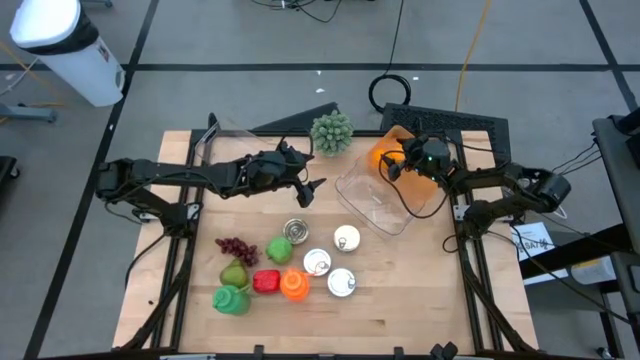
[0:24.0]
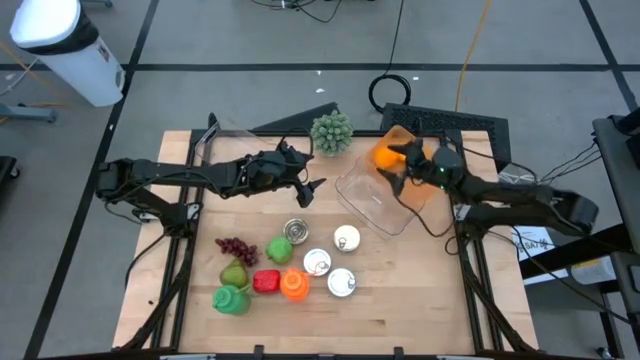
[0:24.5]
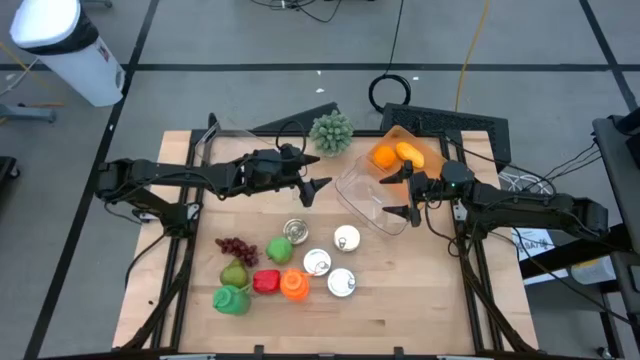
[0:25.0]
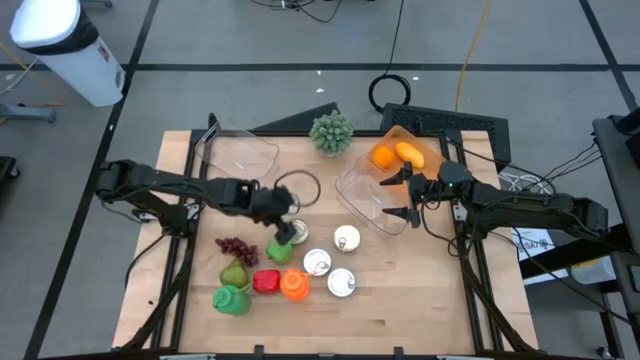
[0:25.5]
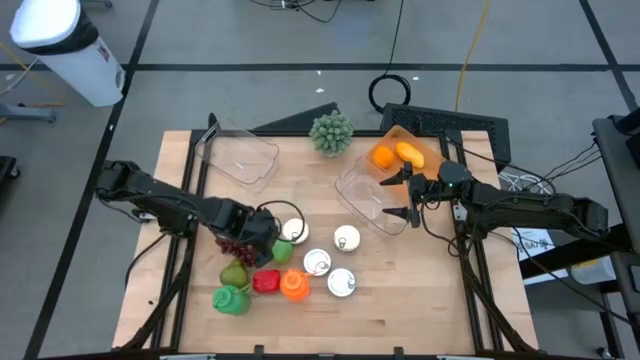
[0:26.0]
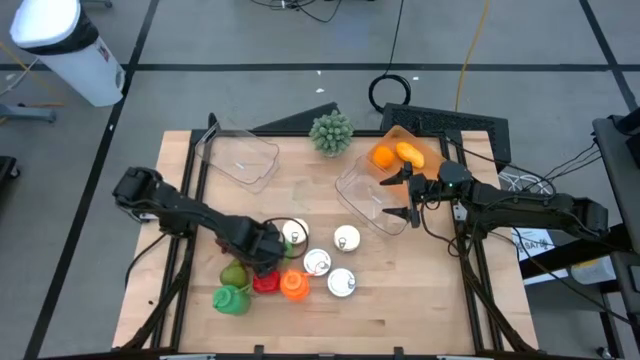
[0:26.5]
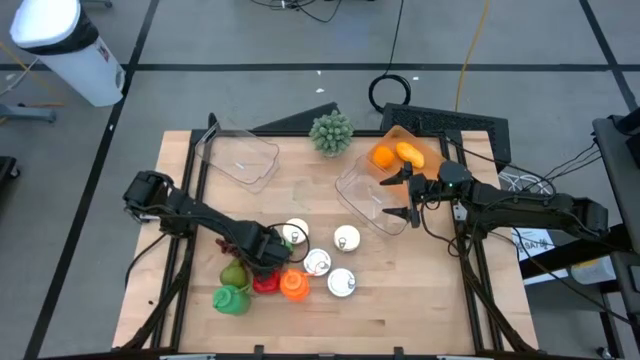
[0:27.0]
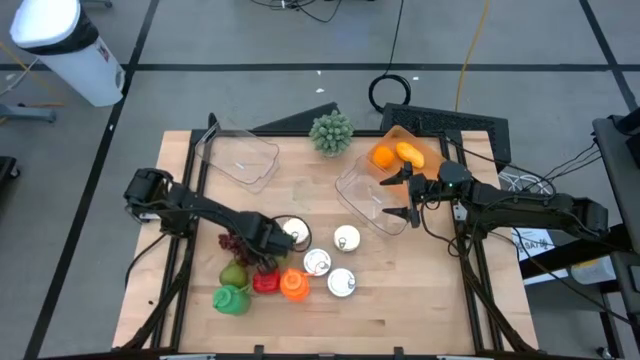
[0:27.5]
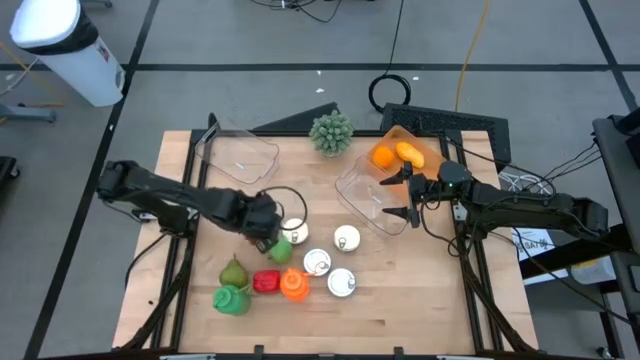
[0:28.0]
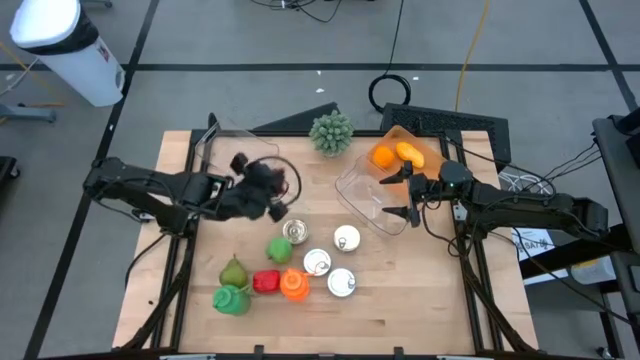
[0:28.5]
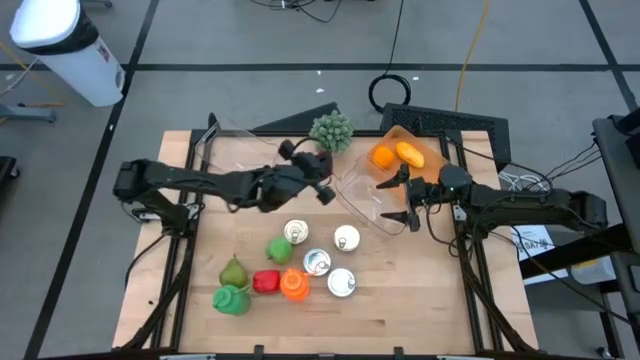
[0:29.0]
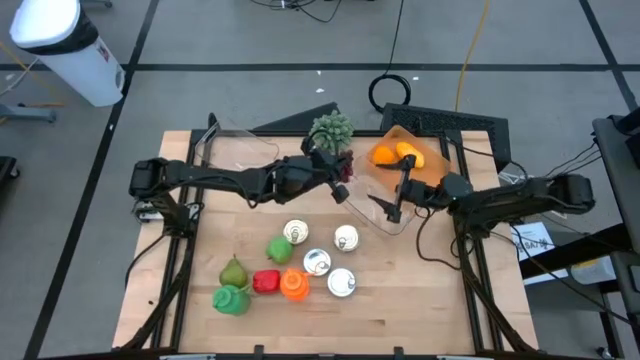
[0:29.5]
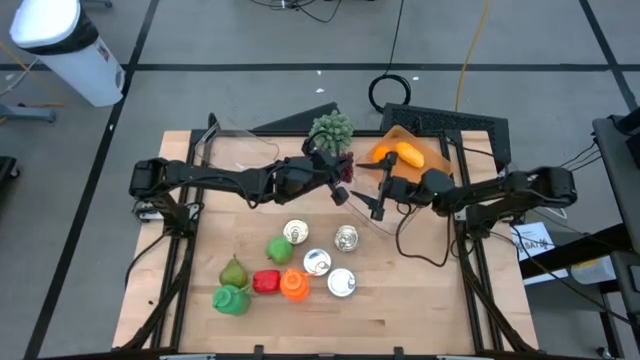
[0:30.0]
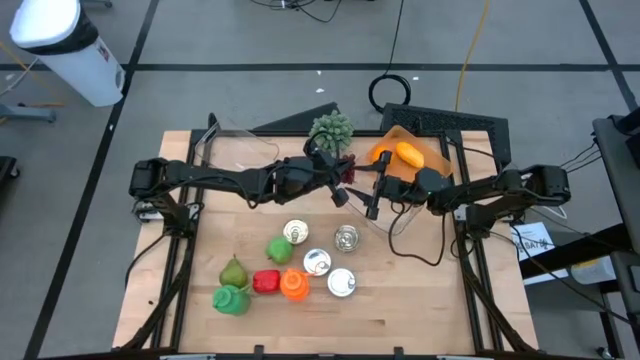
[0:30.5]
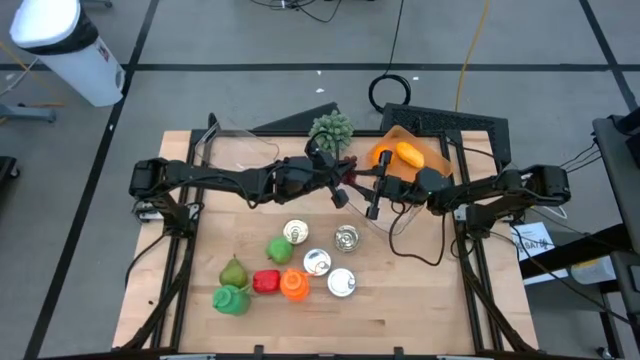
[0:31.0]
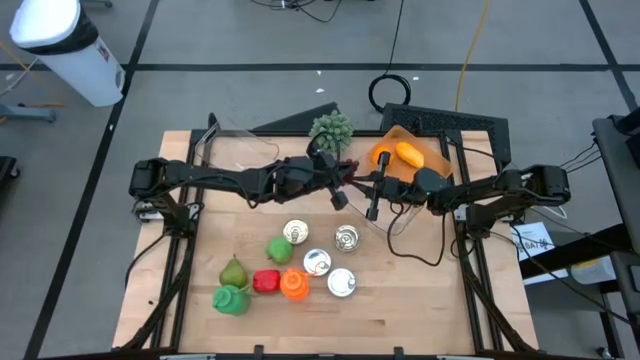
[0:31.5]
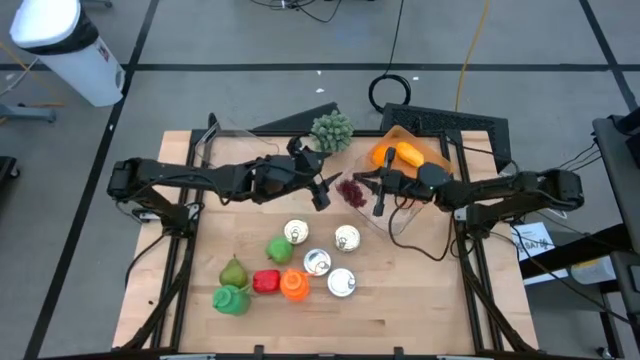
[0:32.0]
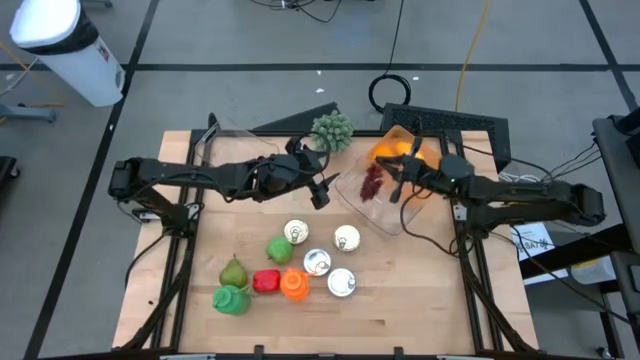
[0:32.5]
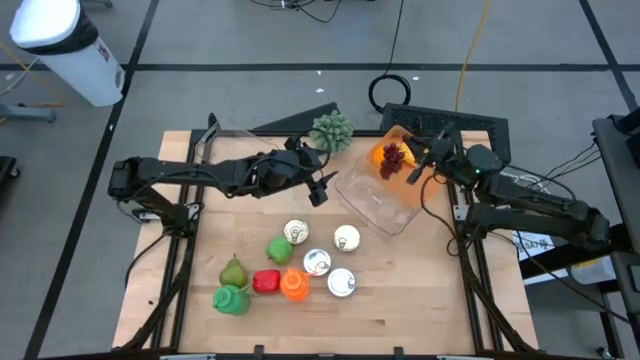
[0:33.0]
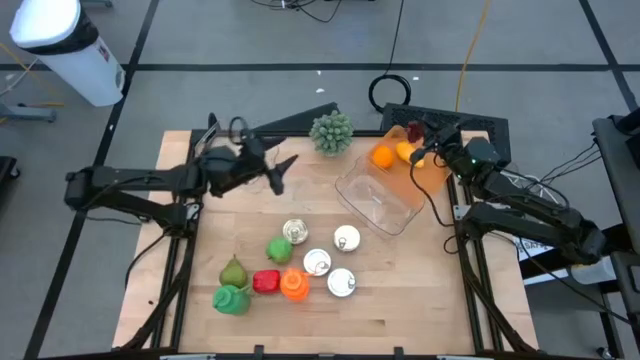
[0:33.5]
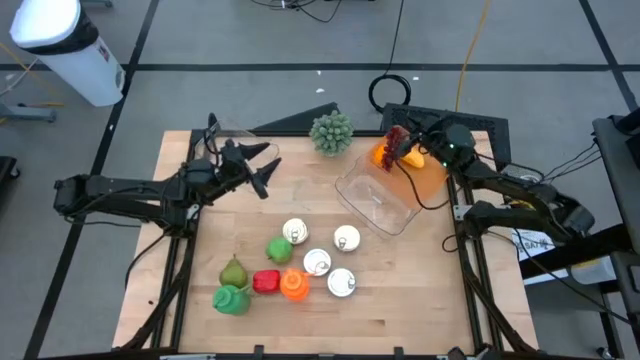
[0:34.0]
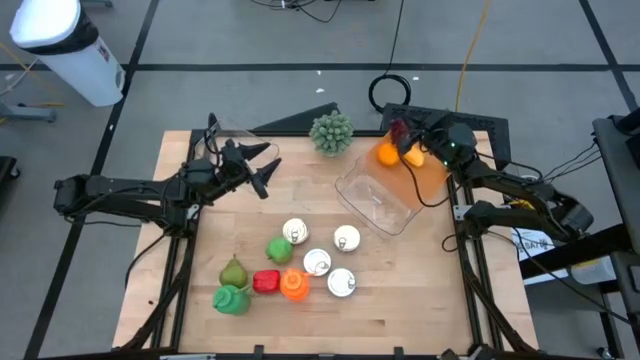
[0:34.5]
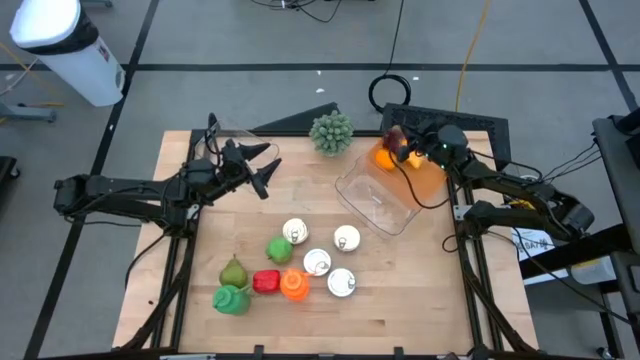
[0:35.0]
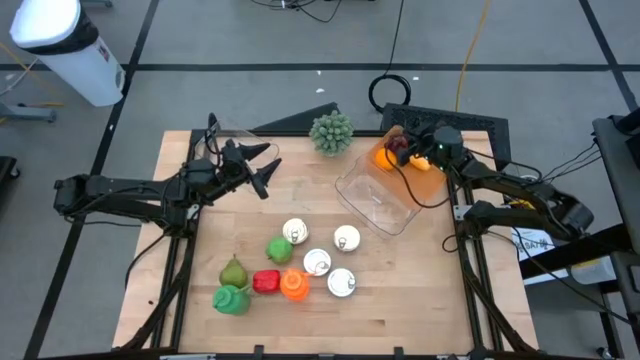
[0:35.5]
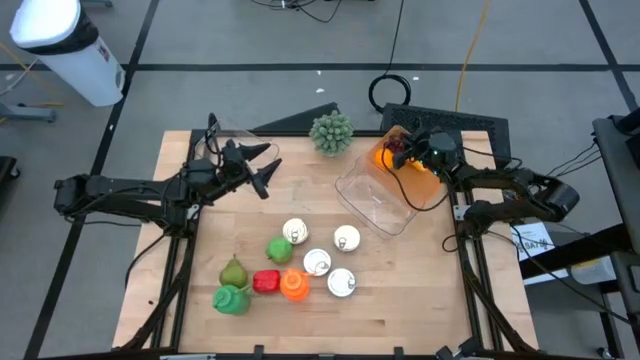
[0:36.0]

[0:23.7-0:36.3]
Task: Pick & Place Food Item
Put the red grapes into the orange bin

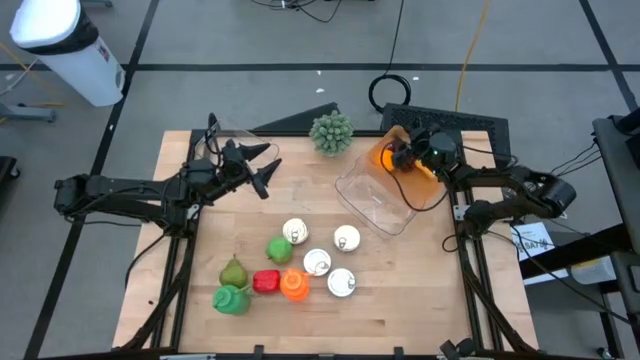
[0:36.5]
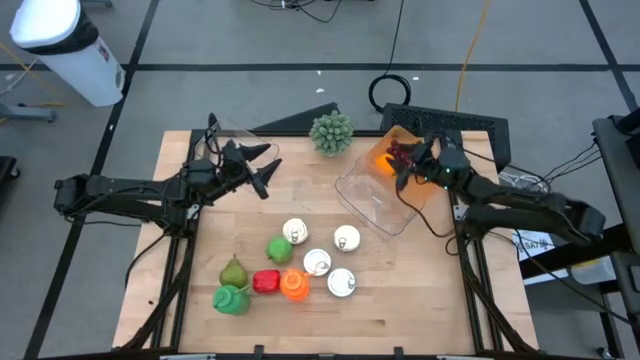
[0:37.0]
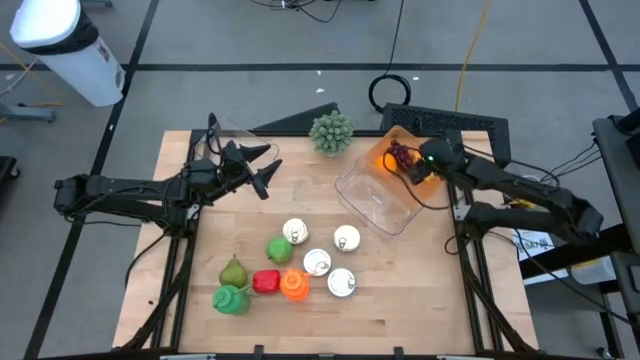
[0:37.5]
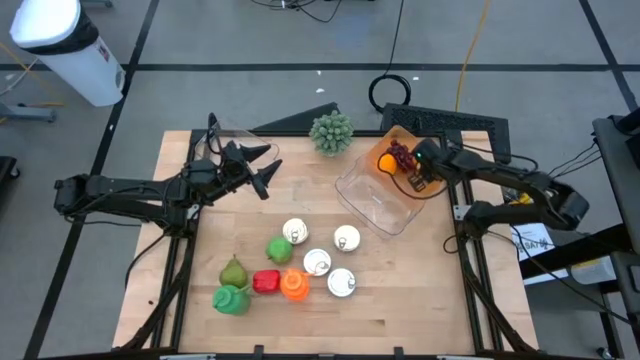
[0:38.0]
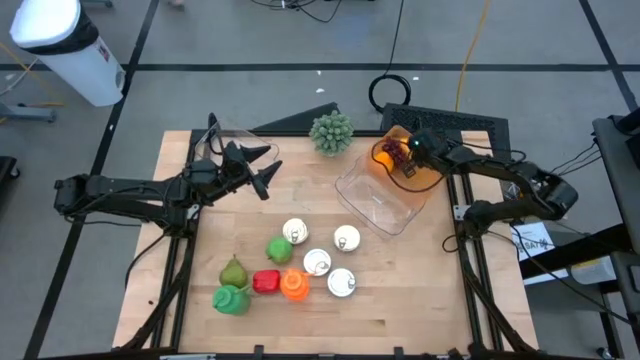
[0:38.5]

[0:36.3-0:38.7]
Adjust the yellow mango

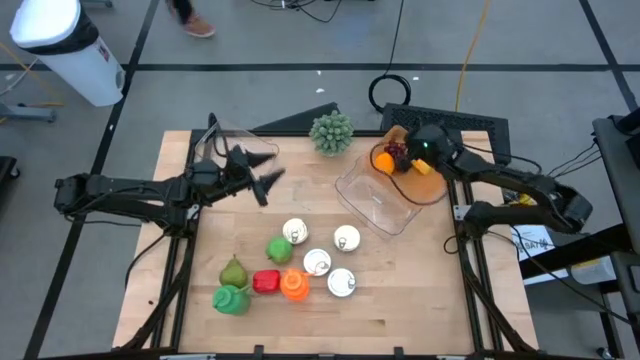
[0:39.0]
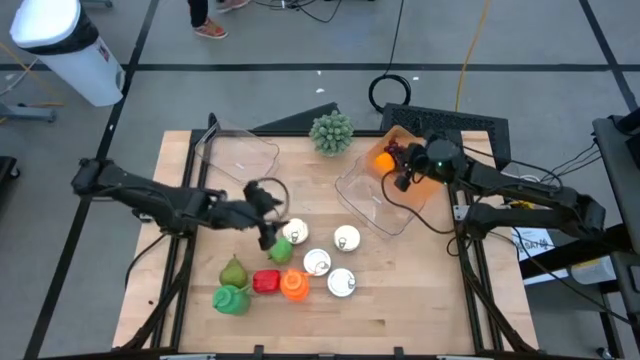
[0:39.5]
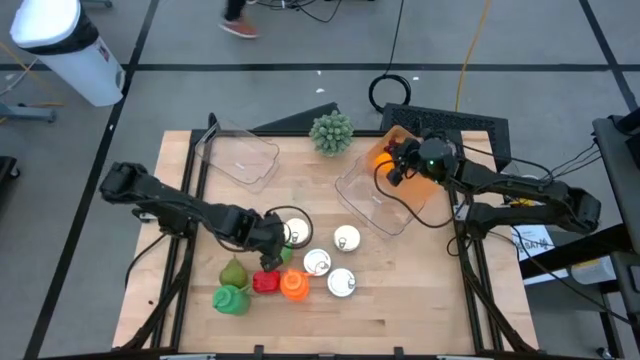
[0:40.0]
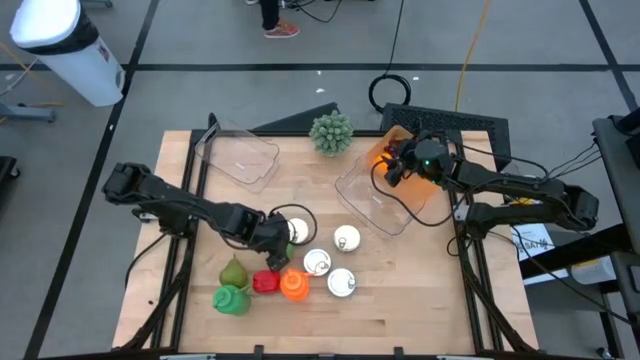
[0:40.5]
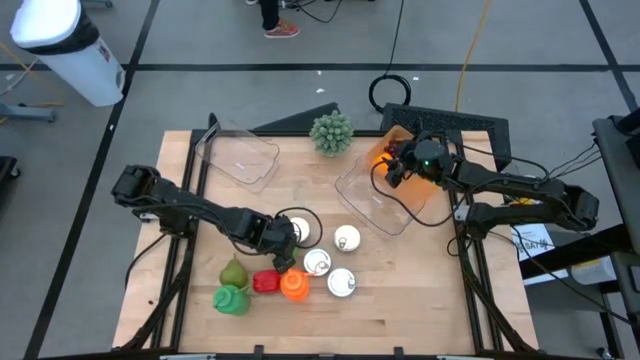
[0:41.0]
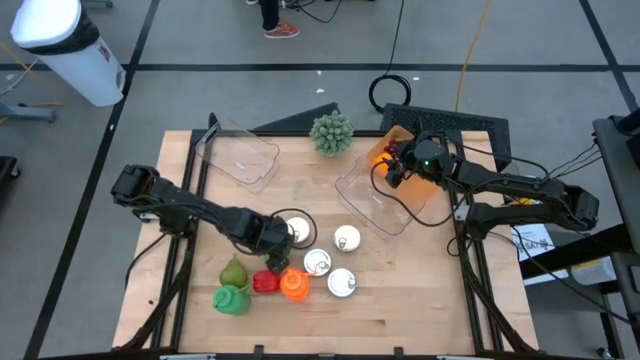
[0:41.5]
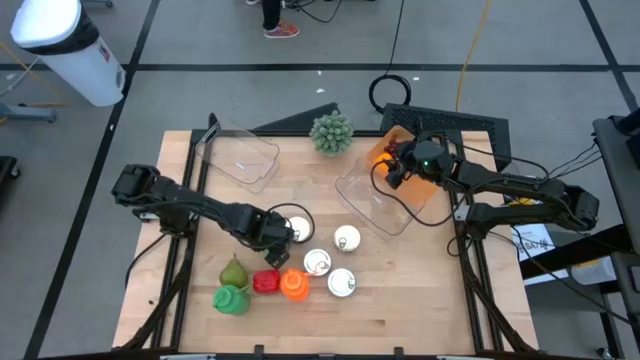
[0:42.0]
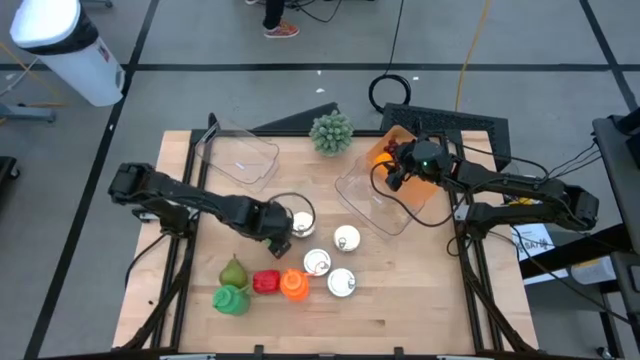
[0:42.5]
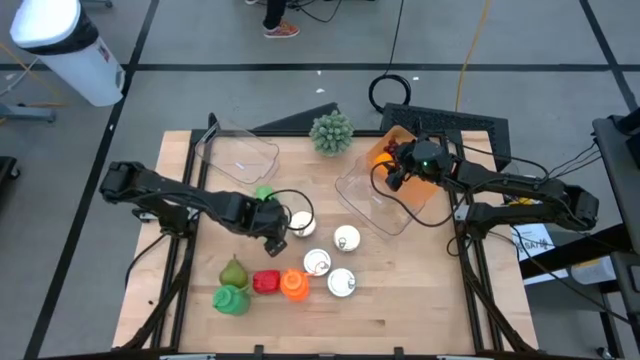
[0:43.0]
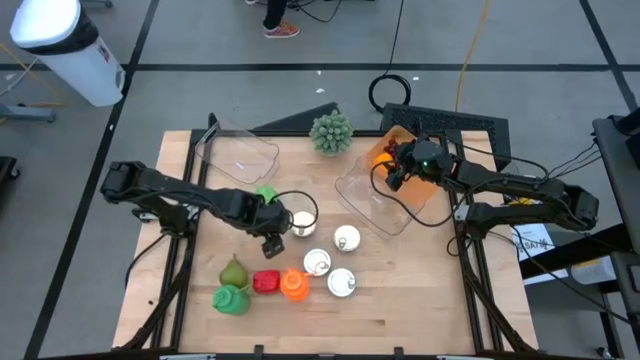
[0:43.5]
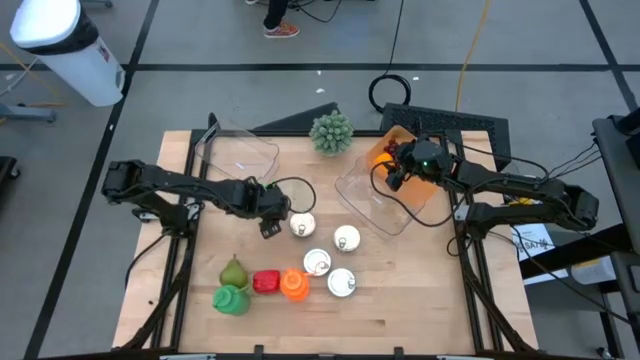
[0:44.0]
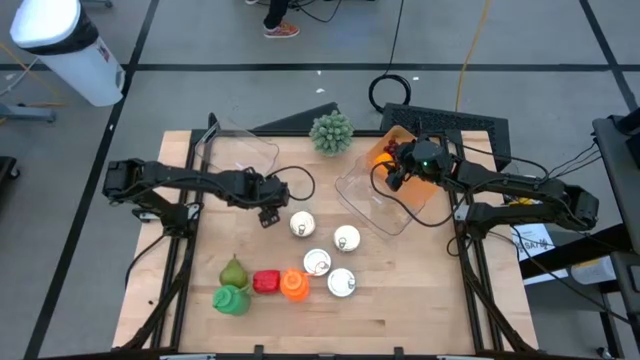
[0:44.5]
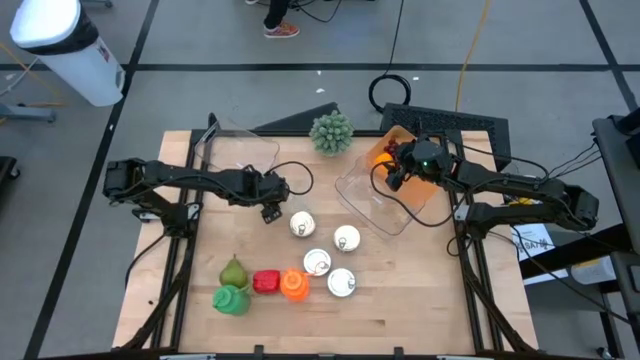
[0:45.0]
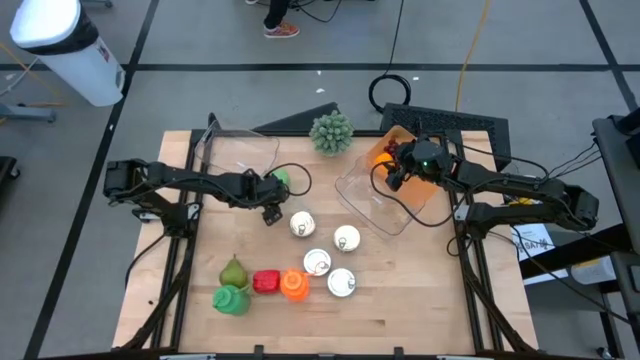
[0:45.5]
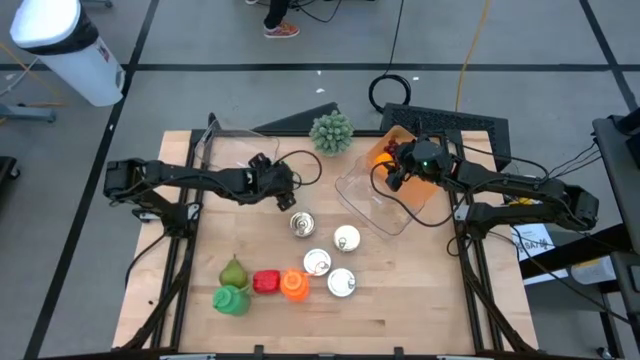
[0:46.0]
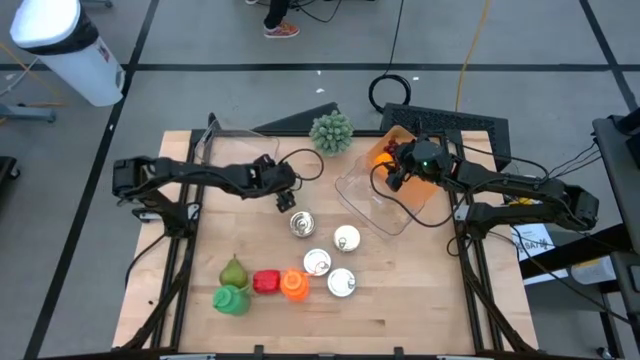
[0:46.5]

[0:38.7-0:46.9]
Put the green apple into the orange bin
